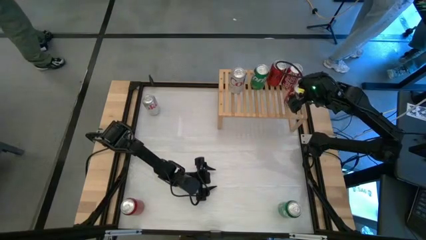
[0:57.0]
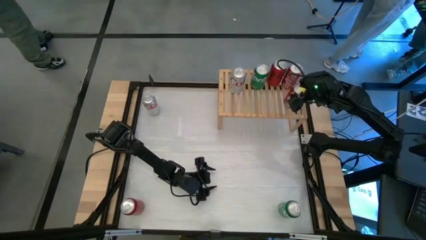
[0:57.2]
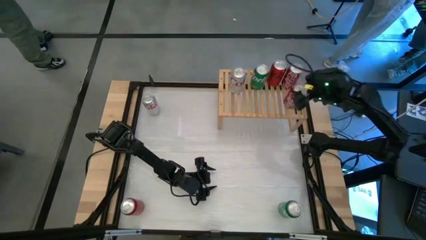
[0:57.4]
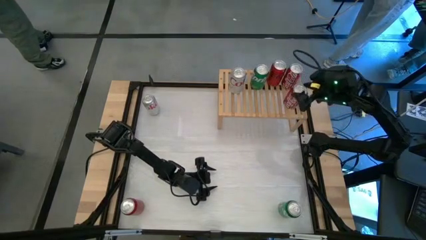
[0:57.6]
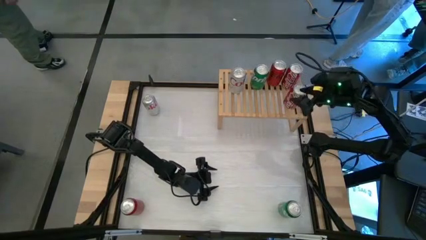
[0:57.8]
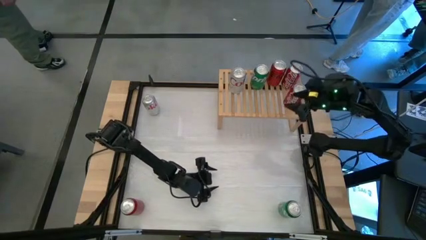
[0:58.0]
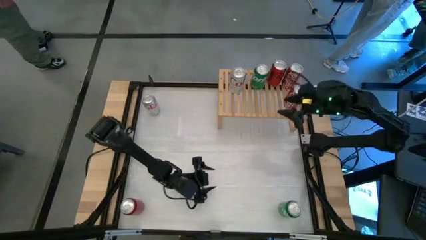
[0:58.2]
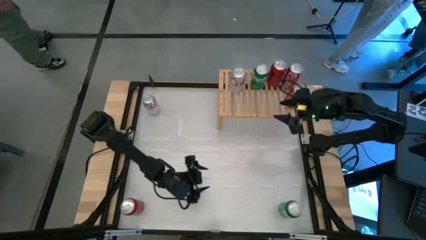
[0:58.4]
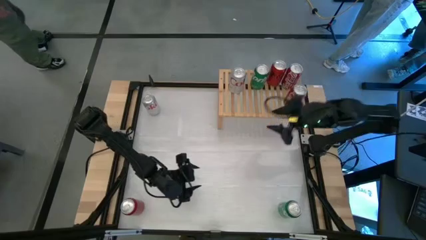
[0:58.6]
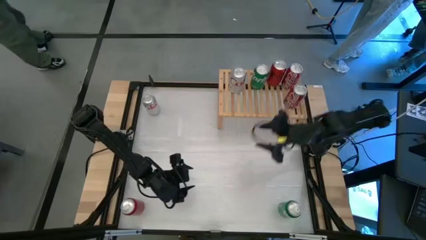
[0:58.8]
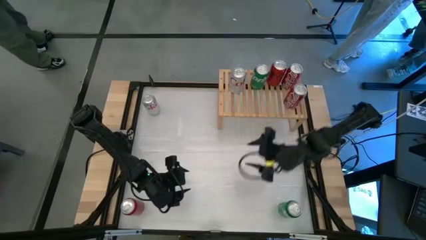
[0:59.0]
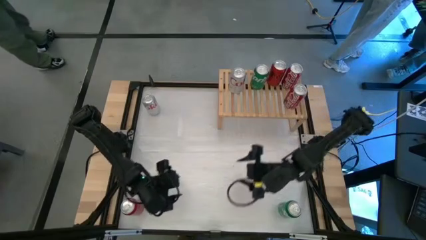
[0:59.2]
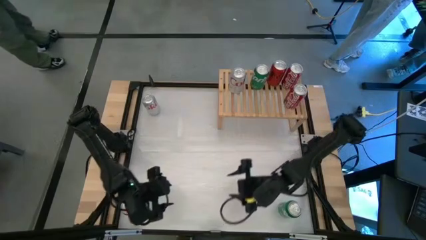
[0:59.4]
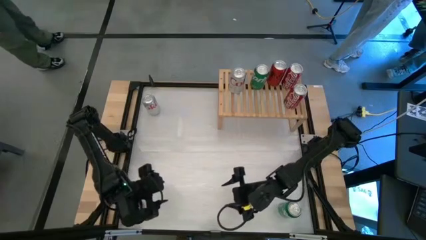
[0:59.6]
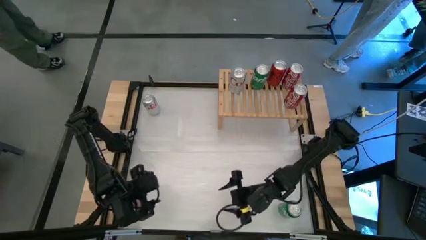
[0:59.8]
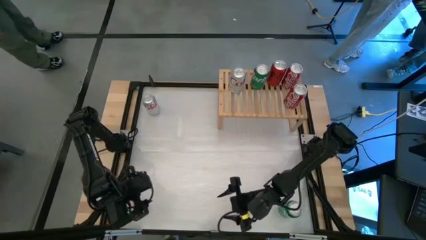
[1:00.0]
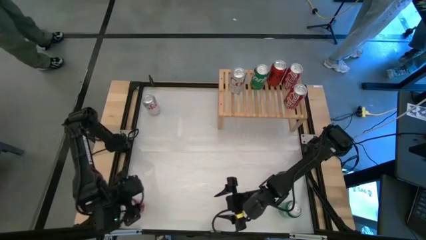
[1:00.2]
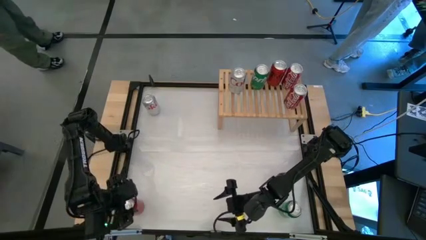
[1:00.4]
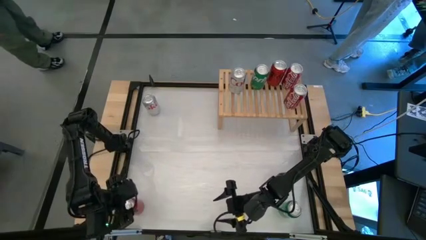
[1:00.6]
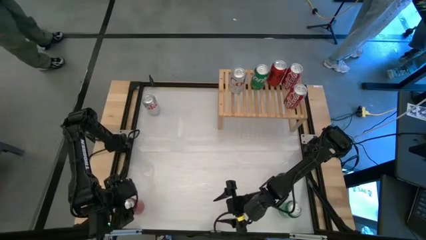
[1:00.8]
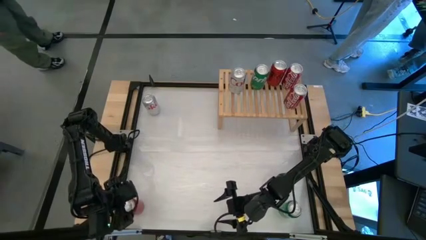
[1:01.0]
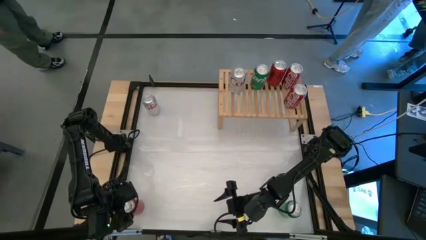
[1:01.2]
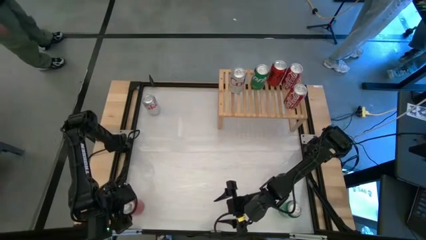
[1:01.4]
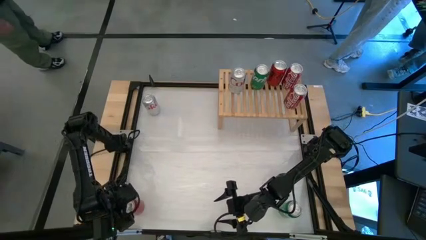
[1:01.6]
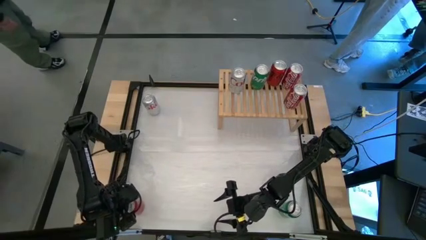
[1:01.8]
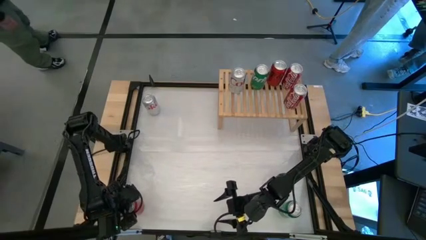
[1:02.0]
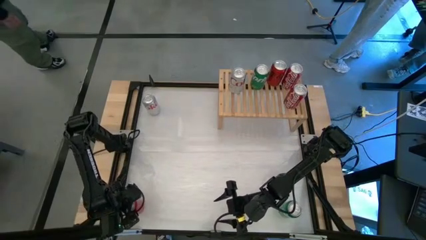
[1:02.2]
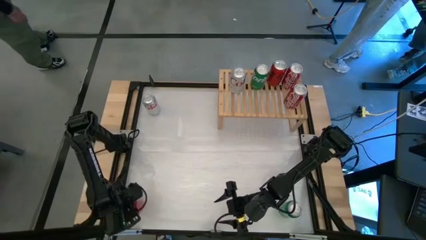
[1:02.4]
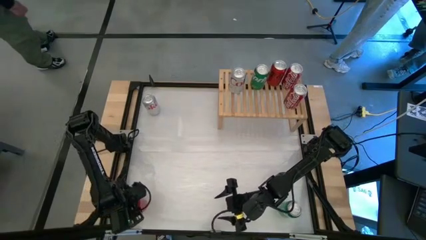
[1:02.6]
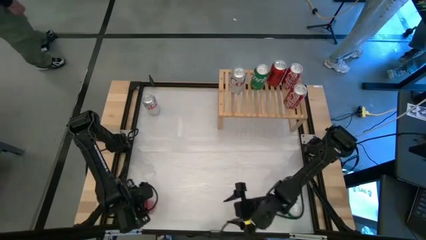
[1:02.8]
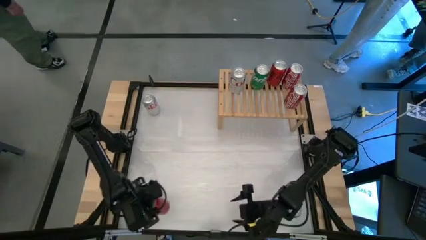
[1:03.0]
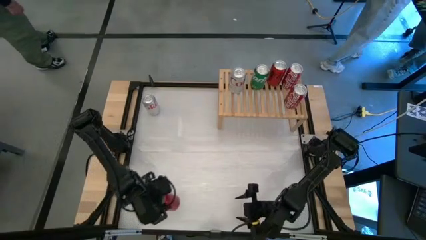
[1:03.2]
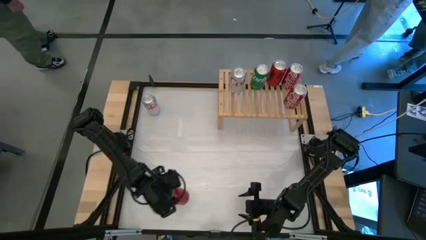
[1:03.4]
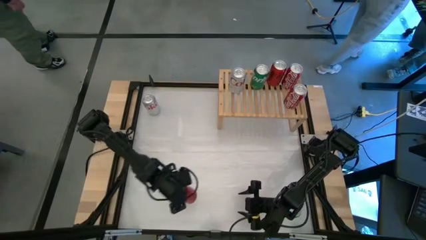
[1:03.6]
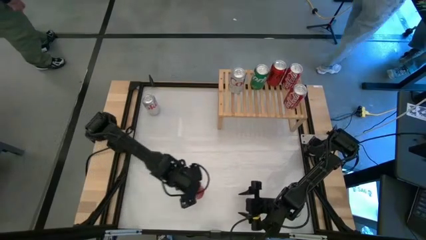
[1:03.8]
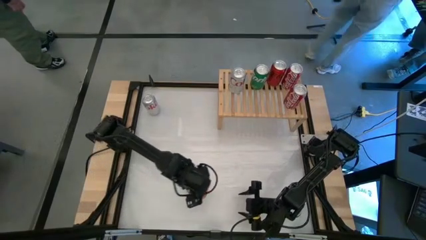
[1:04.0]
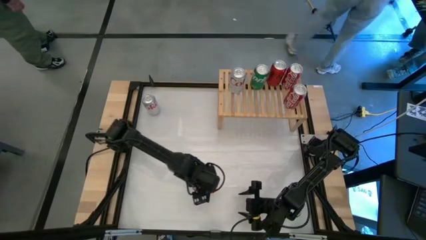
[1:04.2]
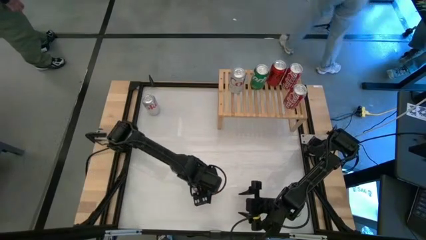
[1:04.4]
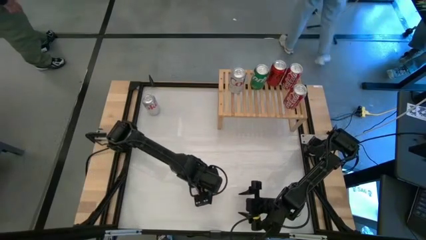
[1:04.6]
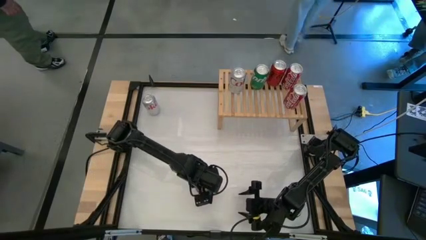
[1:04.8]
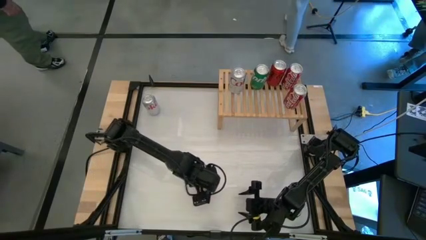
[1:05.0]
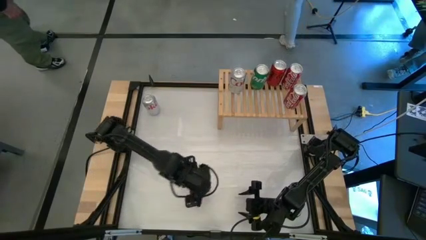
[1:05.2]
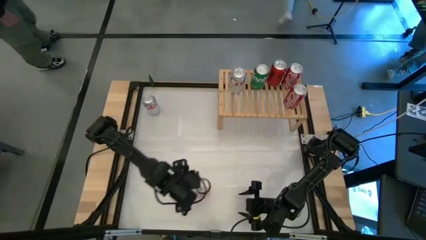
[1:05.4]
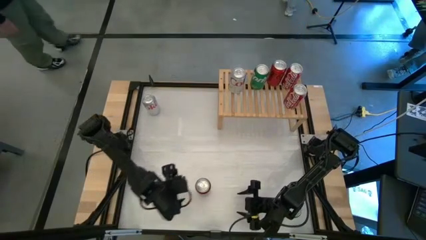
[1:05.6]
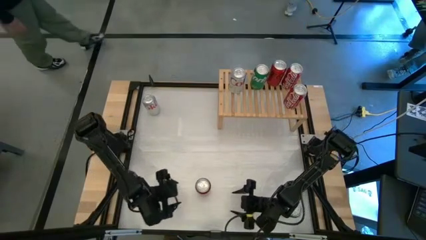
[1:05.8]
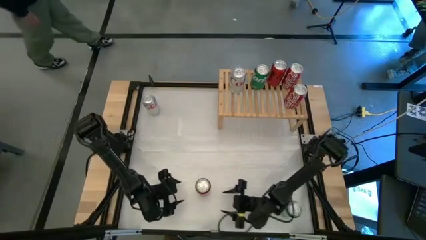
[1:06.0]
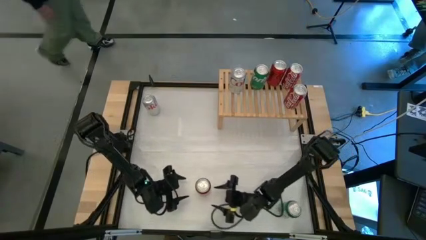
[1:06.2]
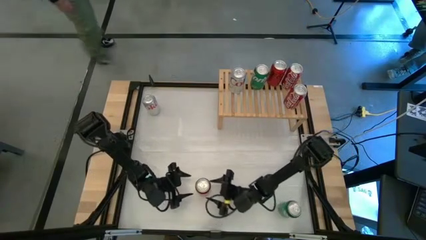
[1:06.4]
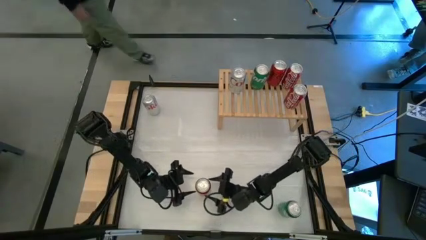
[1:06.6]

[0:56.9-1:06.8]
Task: Place canned beverage on shelf
Put the red black soda can on the shelf aligned with the other red black soda can

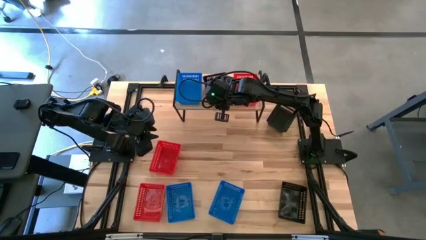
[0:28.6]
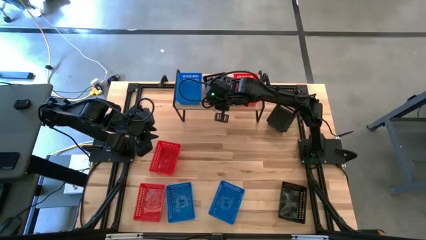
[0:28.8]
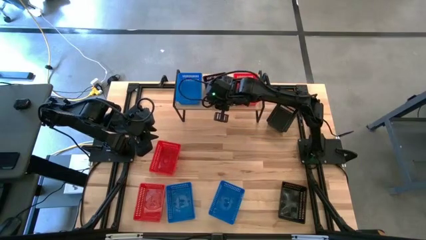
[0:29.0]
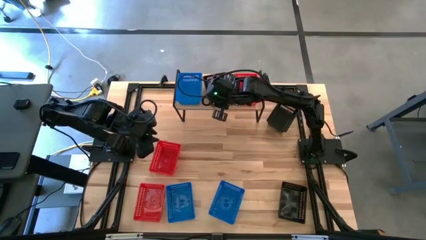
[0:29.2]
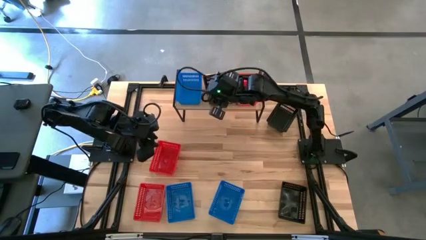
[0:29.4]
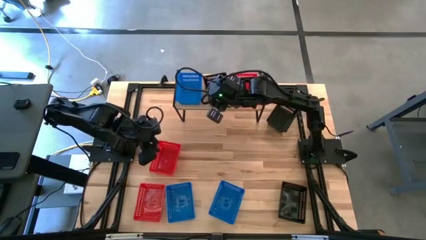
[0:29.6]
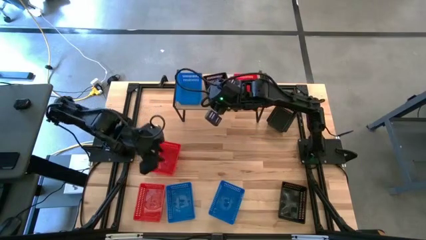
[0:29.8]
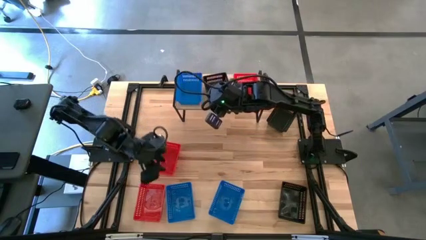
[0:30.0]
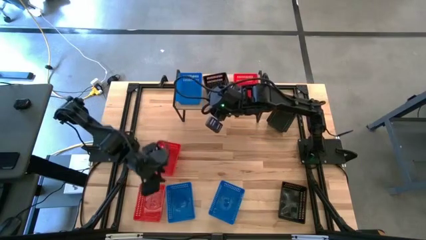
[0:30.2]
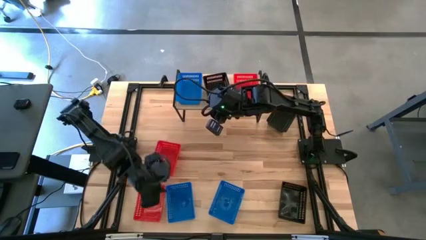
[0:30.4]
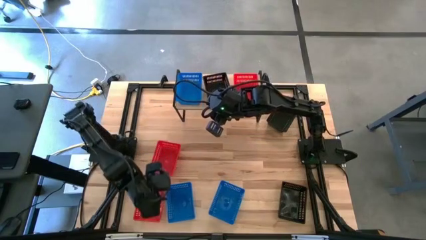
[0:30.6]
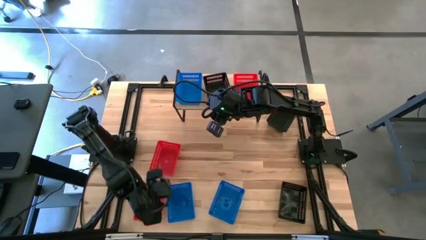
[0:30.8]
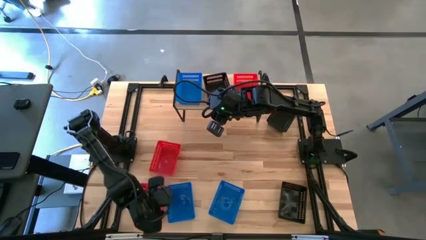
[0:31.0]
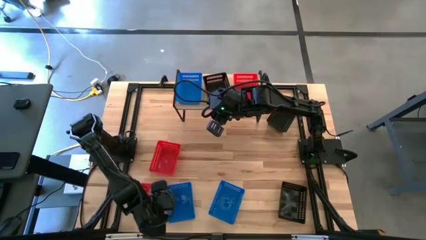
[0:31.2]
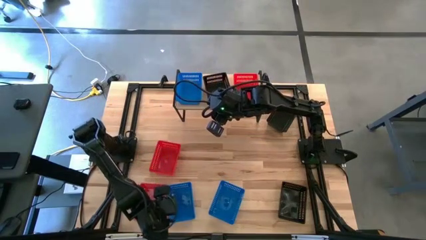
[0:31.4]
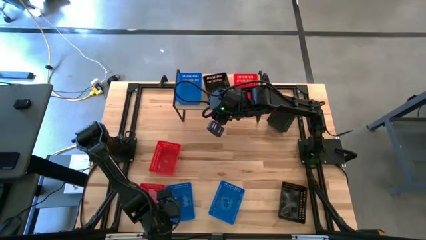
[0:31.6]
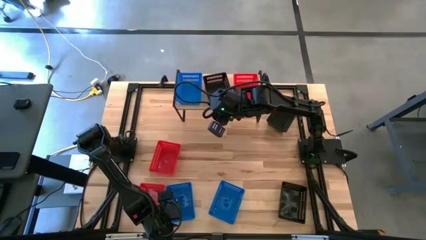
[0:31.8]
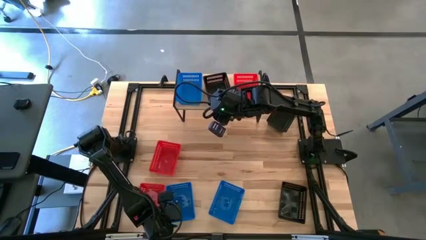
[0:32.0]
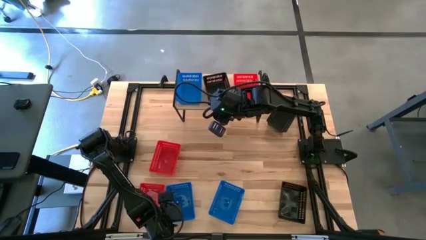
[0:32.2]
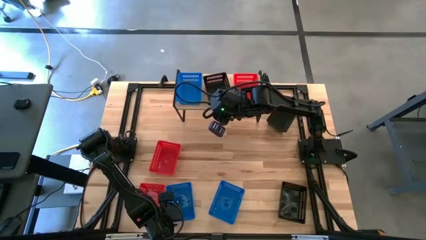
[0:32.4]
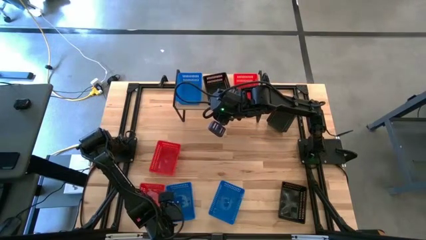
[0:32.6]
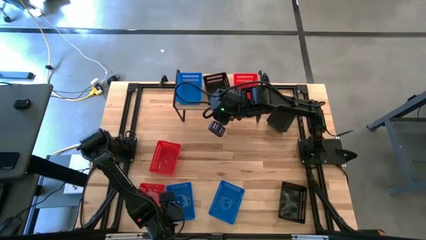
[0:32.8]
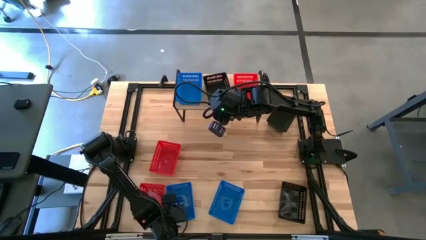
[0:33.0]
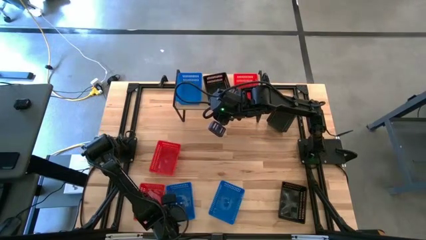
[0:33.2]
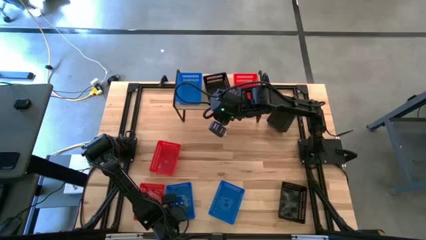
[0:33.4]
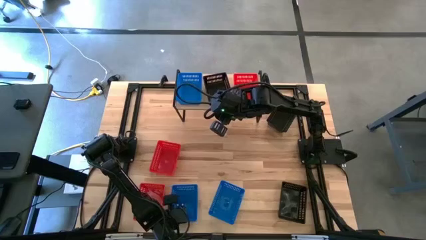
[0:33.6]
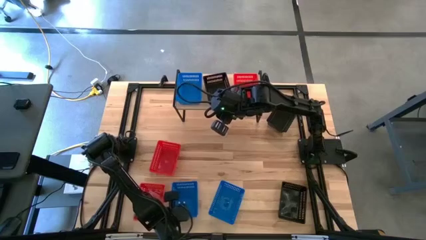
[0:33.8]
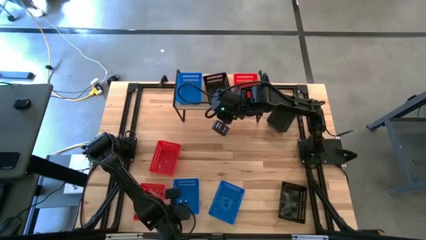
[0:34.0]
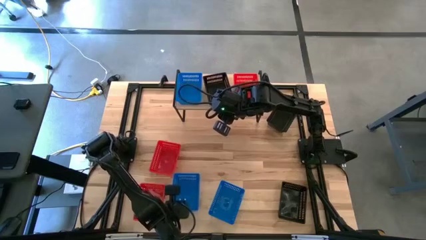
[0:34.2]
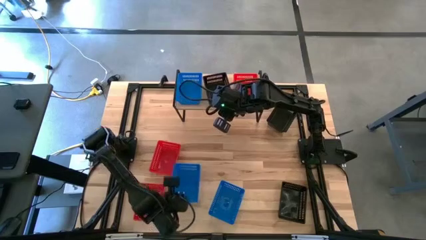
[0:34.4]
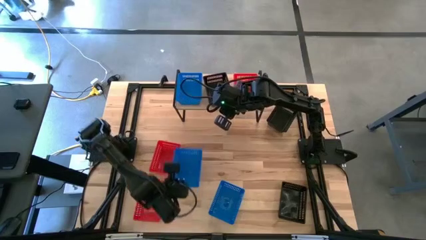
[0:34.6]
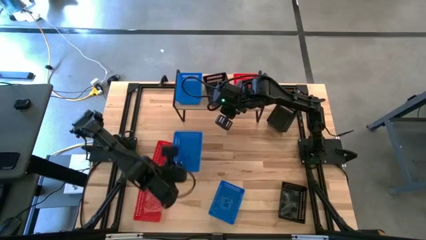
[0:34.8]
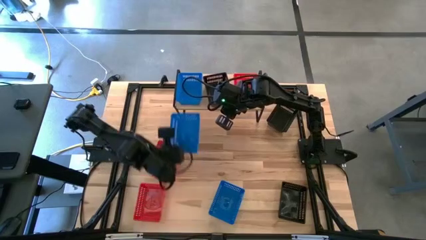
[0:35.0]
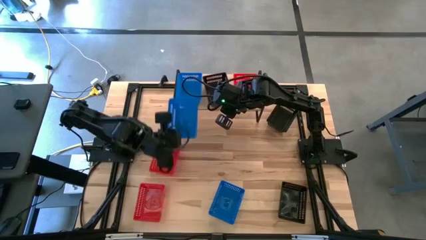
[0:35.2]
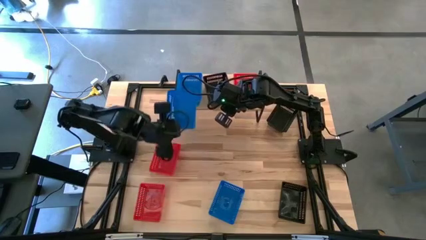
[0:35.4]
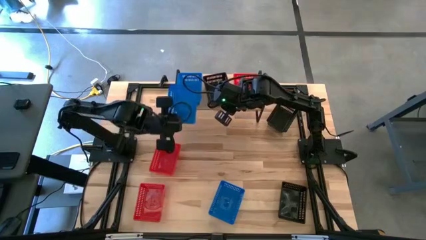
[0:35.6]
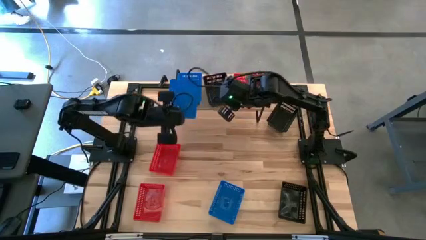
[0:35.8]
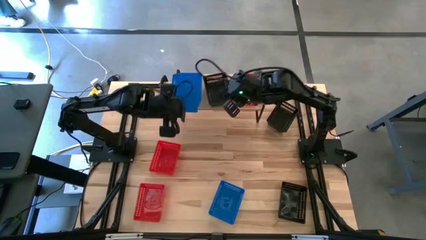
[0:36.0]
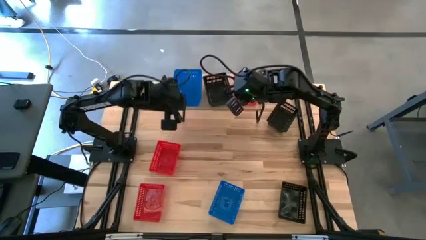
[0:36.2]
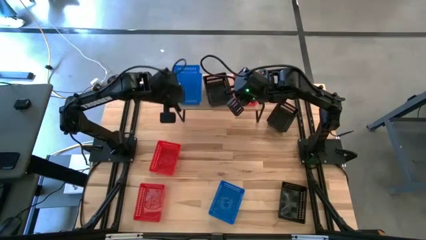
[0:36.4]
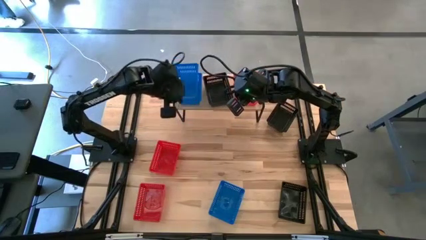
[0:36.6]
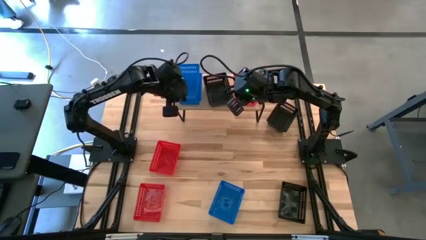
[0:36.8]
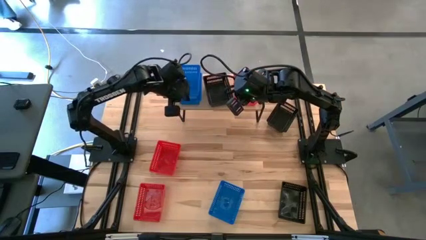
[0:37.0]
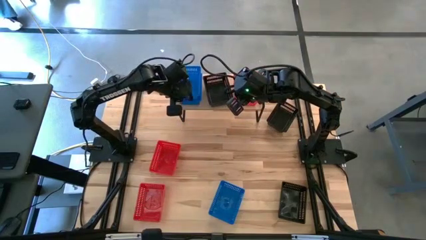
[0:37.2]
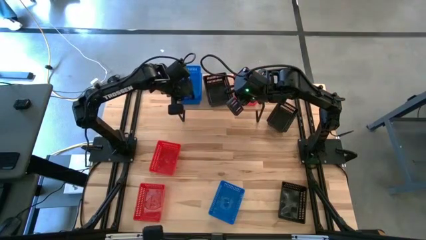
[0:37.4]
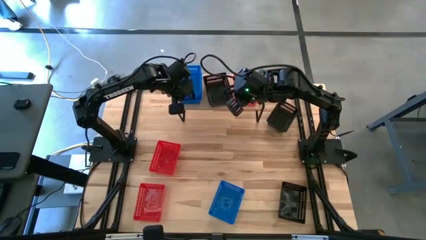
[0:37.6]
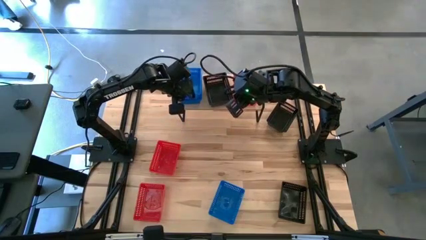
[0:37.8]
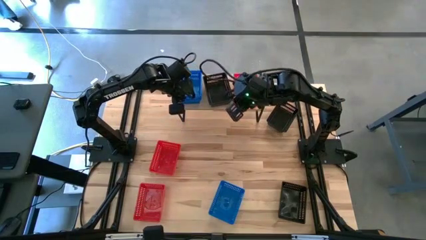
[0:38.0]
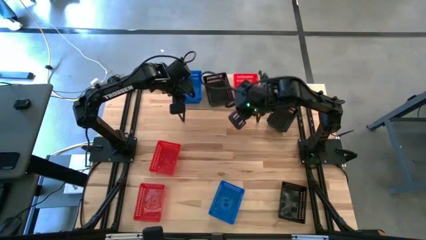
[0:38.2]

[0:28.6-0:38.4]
Task: Stack baskets on shelf by color
Stack the left blue bin on top of the other blue bin on the shelf
